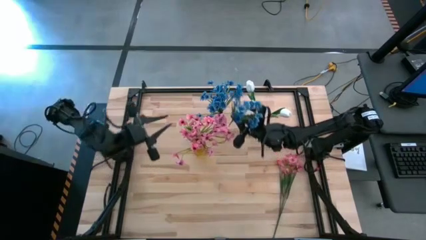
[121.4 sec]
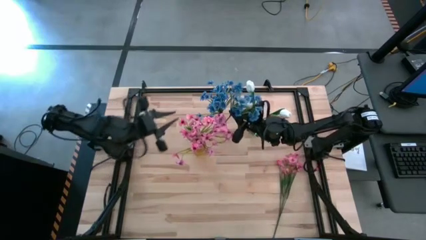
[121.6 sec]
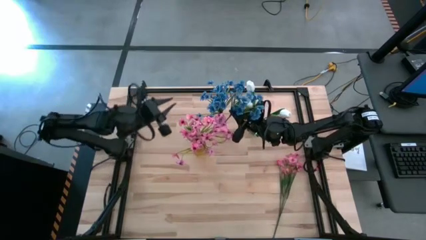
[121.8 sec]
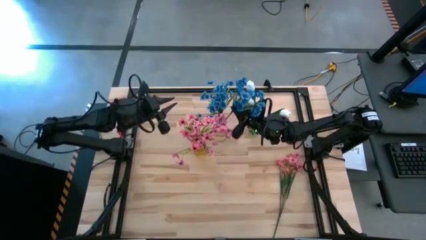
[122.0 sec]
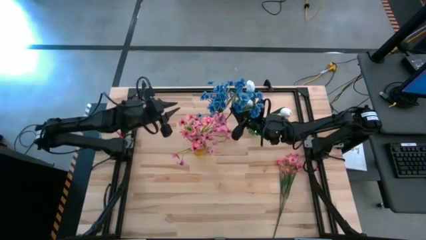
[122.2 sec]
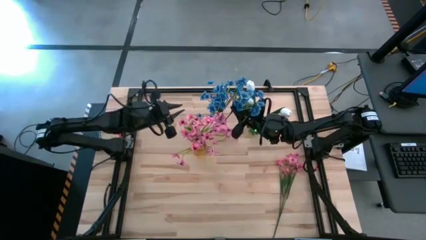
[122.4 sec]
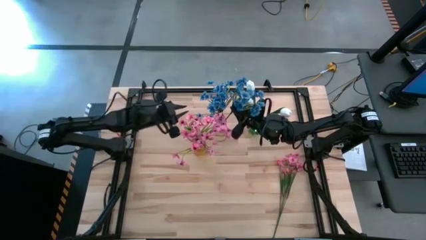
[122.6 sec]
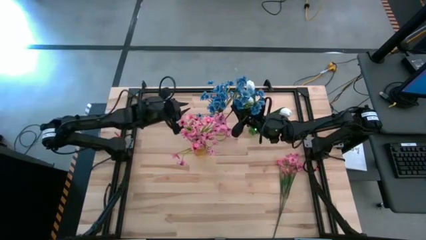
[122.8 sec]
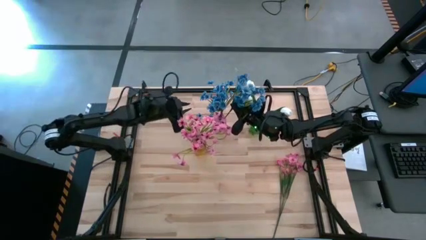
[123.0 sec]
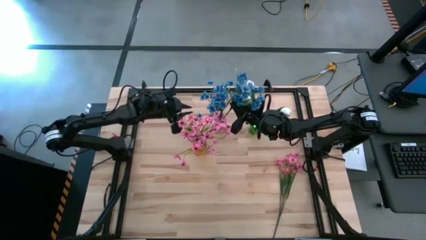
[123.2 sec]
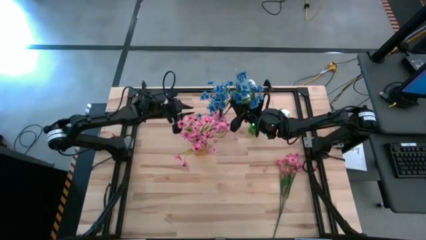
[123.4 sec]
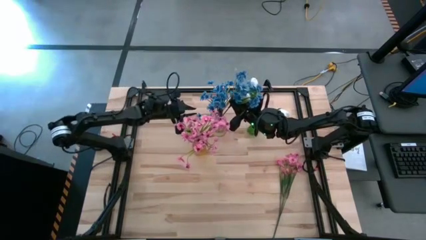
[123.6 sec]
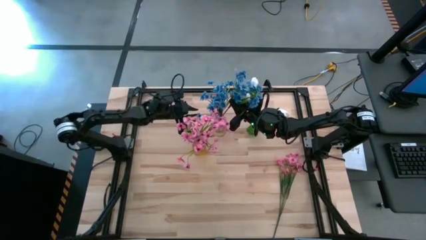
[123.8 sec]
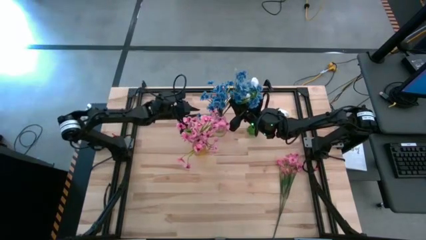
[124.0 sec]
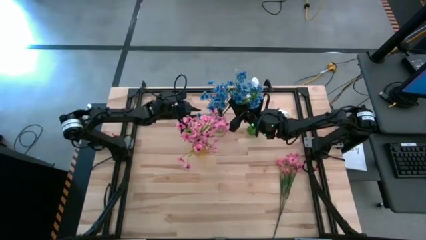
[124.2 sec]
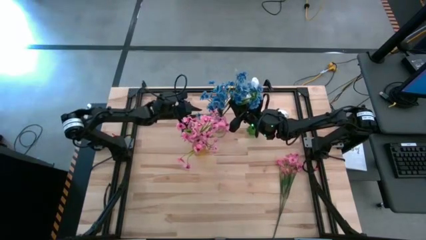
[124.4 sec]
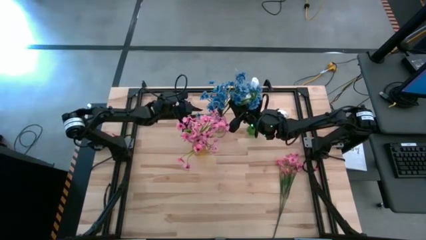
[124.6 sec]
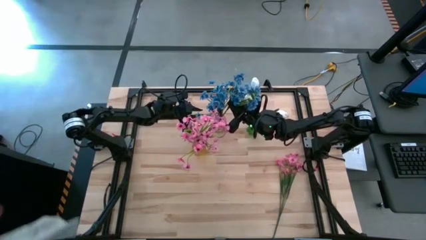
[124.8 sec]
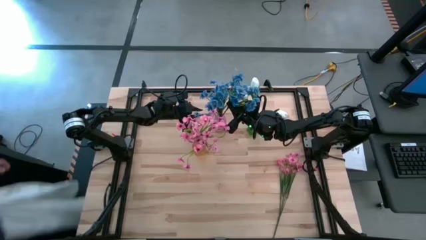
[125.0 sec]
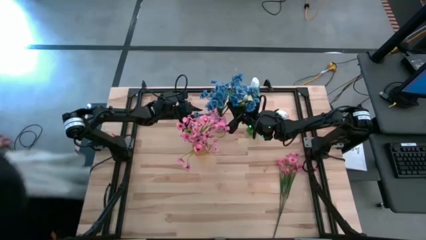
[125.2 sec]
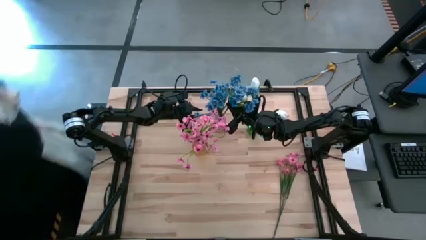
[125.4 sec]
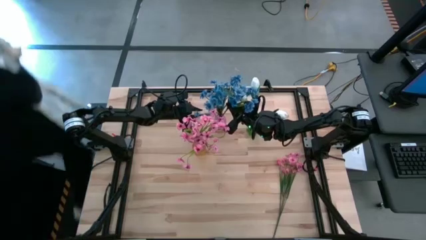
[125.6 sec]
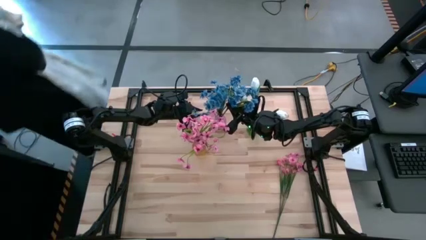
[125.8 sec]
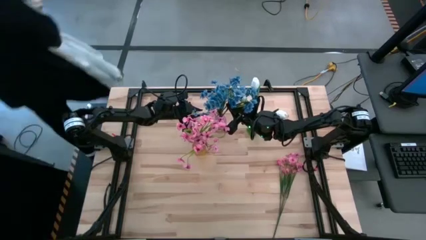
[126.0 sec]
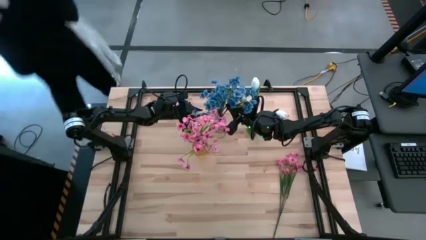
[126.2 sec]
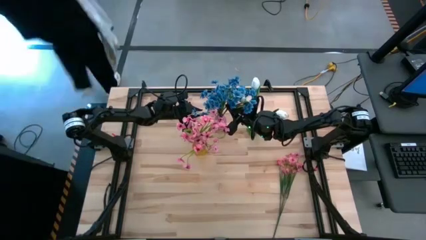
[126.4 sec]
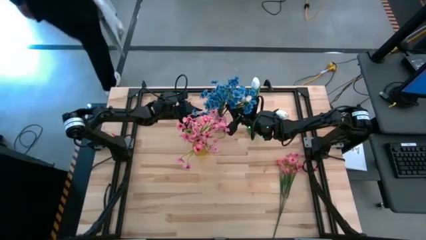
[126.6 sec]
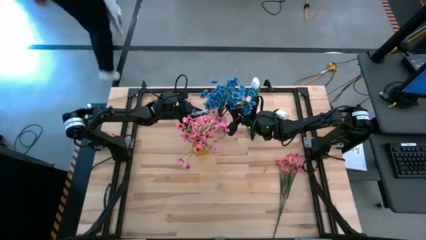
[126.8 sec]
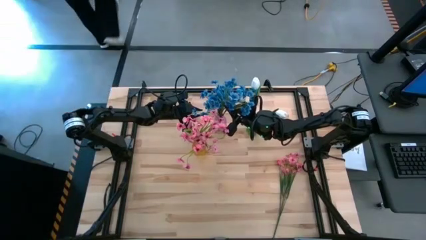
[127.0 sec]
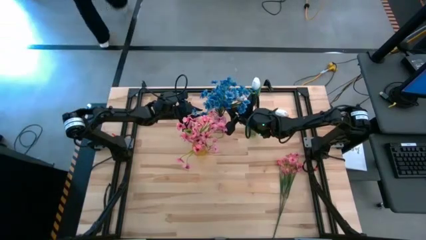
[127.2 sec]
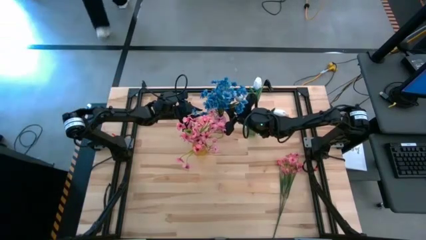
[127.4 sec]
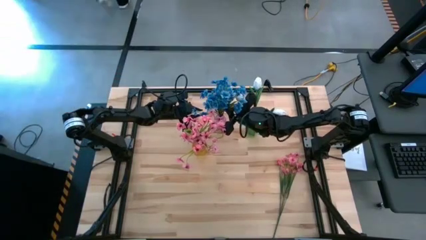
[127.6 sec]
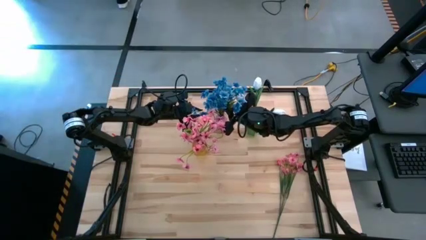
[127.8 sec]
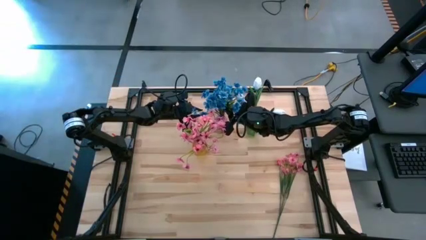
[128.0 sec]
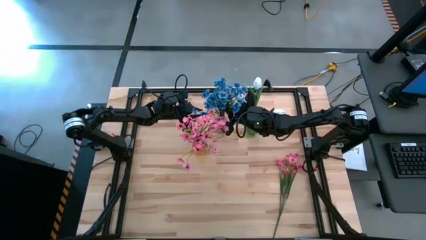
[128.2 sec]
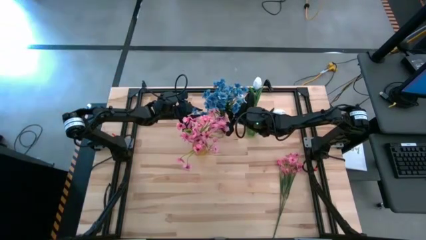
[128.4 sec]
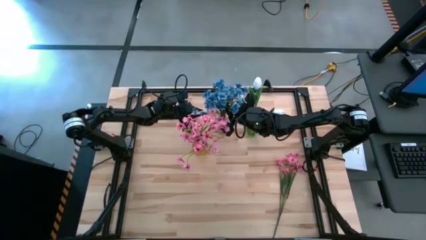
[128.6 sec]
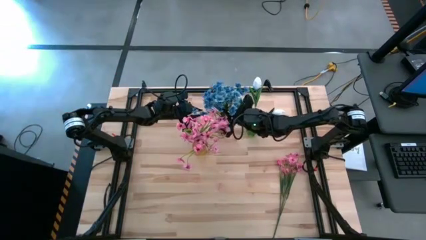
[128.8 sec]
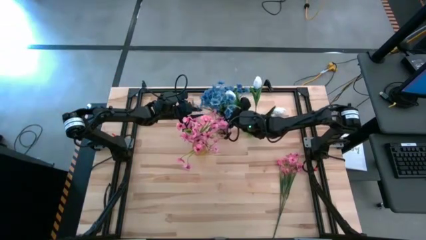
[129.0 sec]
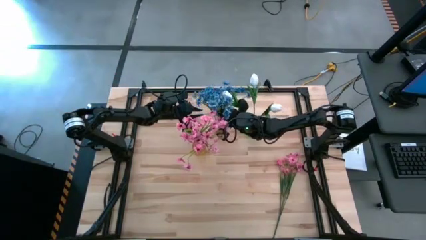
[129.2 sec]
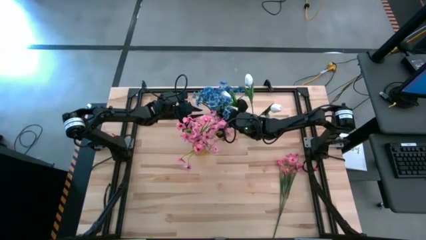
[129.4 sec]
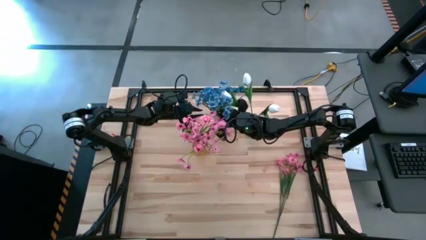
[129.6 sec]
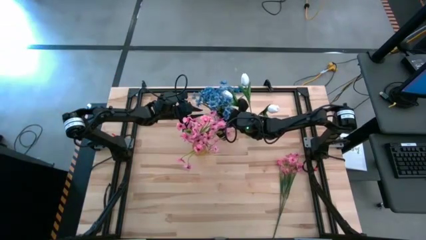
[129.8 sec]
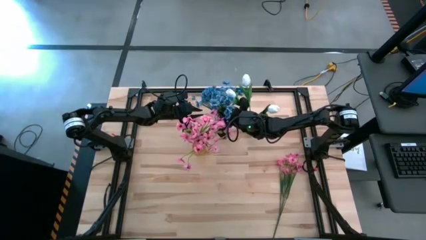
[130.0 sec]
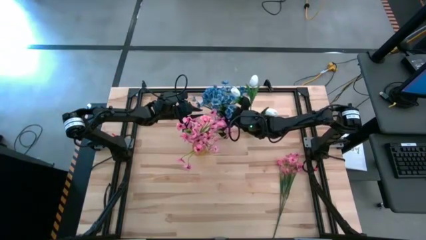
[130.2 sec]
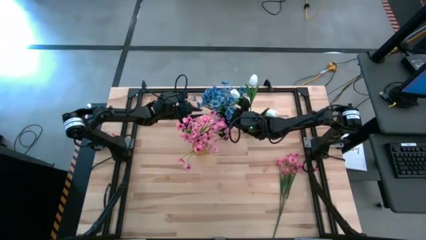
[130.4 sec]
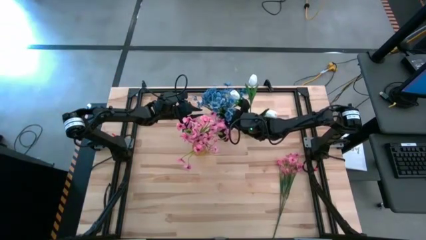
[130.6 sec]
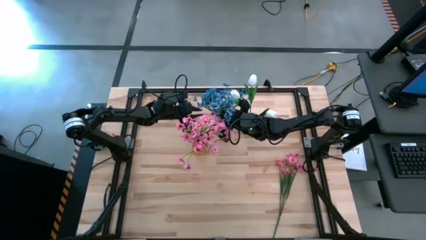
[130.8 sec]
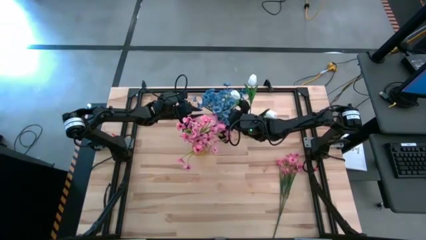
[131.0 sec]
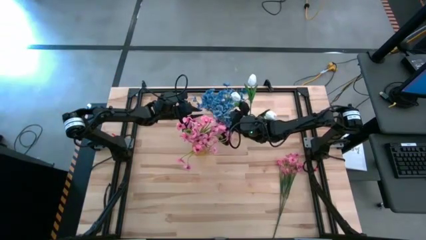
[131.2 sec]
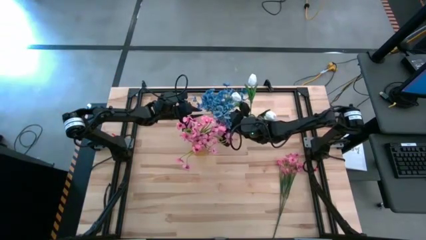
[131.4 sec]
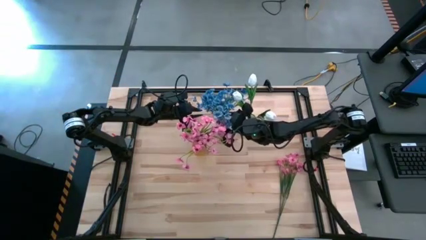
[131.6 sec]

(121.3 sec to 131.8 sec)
Task: Sort flowers into vase by color
Put the blue flowers into the purple flower vase

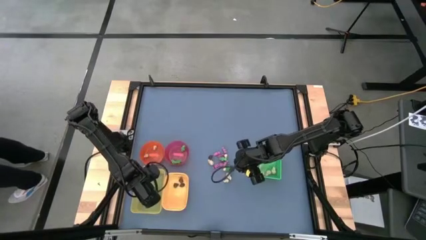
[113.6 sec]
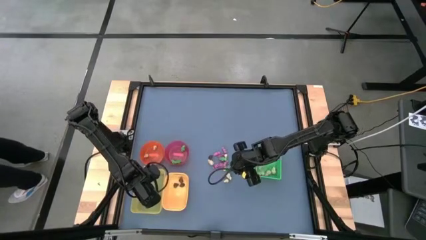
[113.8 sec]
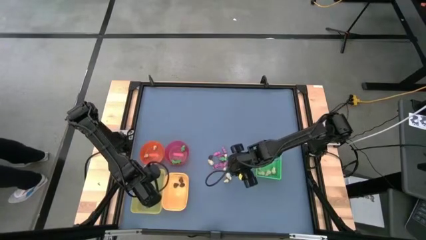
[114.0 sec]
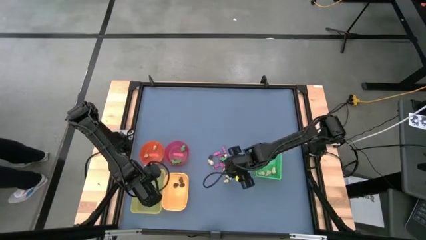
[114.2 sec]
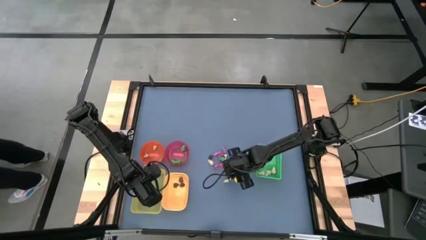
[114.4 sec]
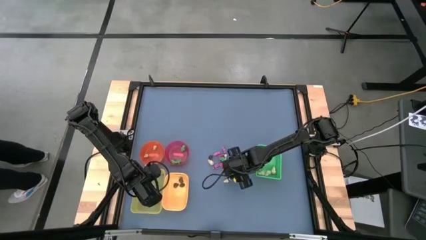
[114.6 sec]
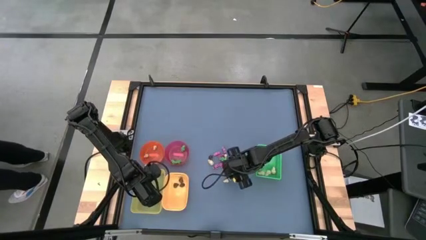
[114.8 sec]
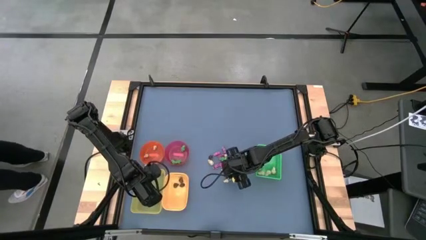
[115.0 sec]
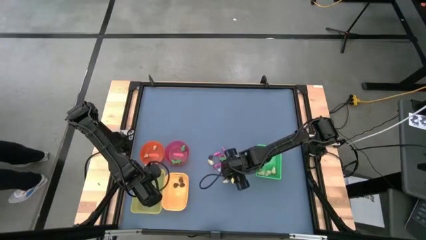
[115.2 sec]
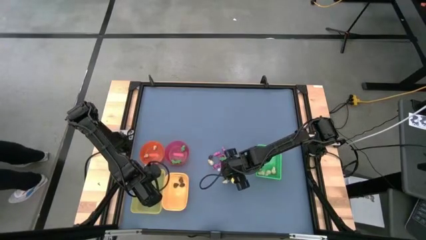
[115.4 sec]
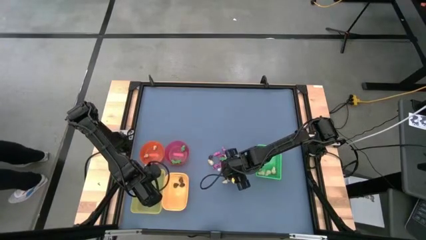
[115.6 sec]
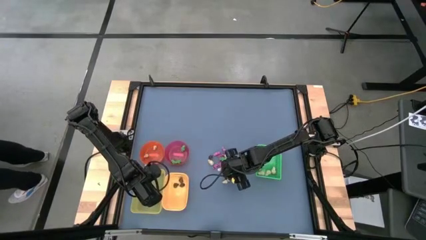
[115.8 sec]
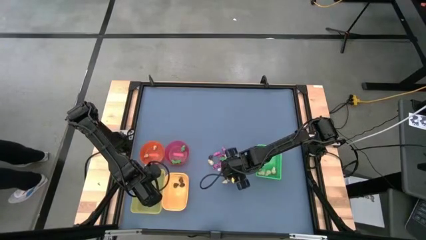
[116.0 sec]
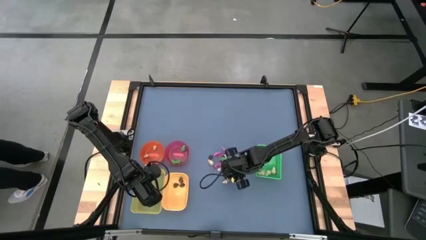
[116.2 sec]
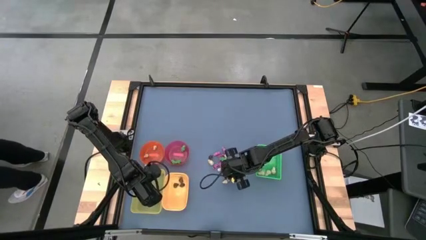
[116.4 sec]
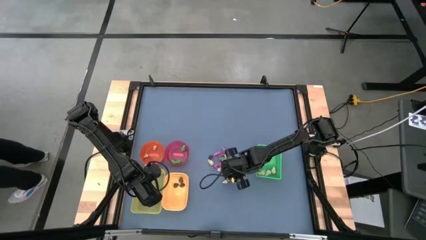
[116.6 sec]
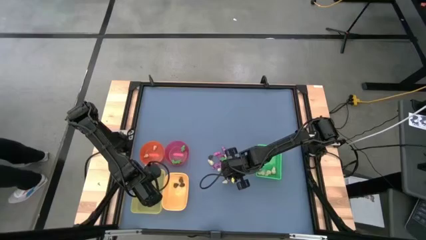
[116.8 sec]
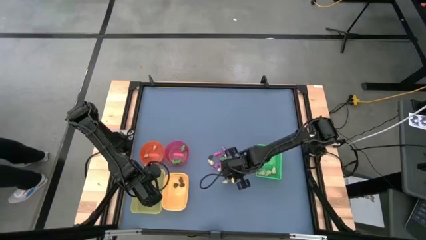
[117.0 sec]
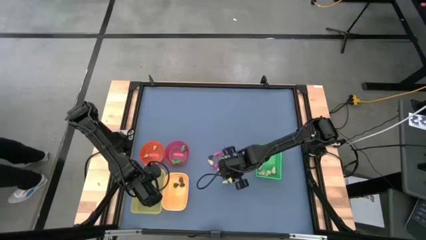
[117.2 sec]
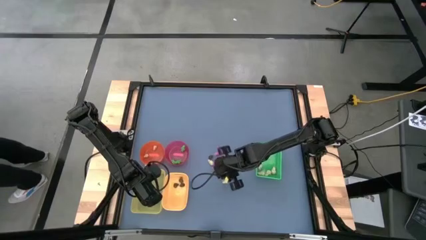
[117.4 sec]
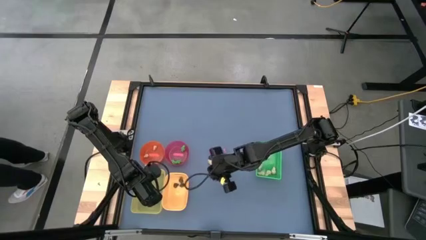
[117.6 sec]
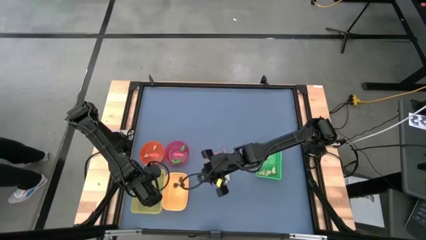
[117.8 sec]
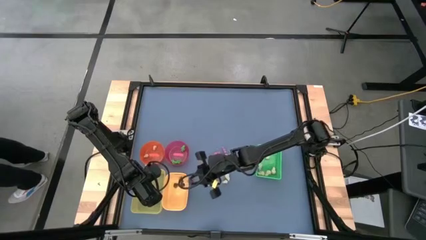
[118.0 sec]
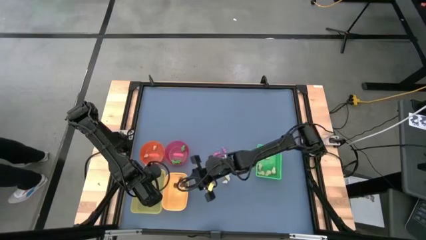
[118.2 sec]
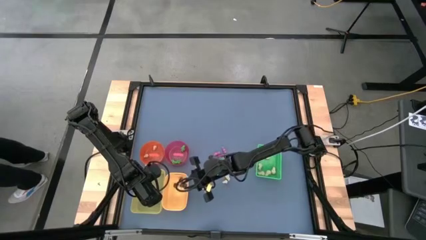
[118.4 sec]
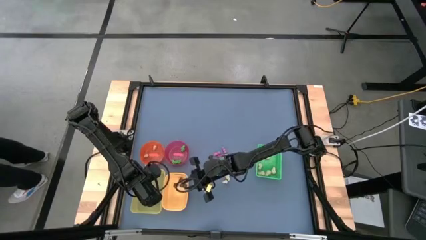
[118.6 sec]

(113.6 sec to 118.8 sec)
Task: Sort Halloween decoration
Put the black skull toy into the yellow bin
